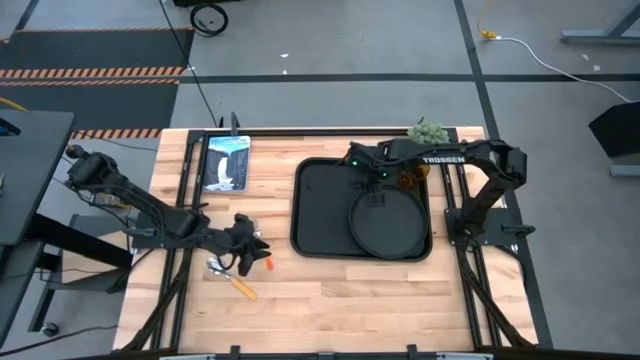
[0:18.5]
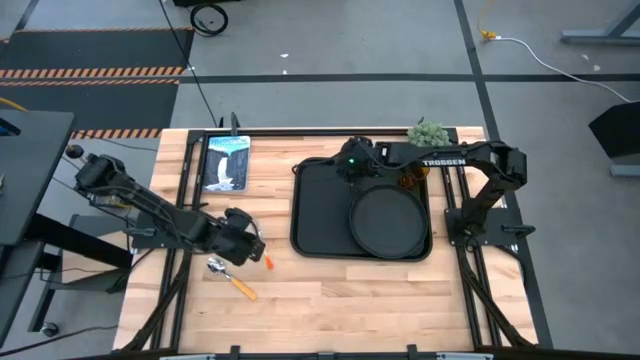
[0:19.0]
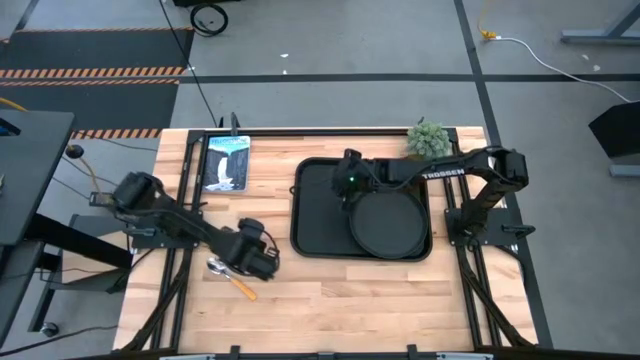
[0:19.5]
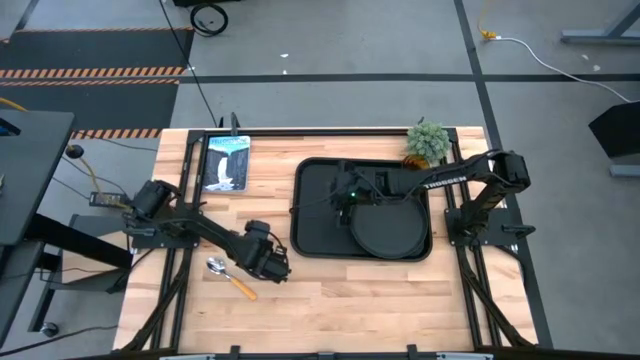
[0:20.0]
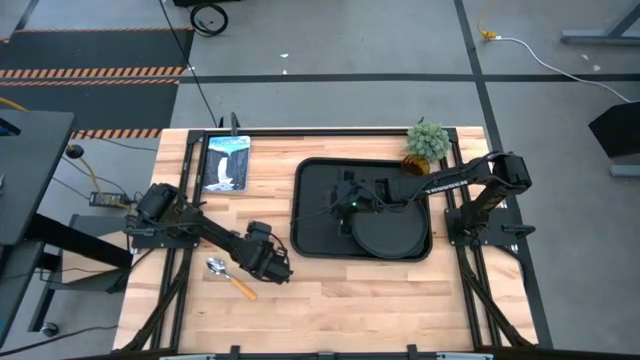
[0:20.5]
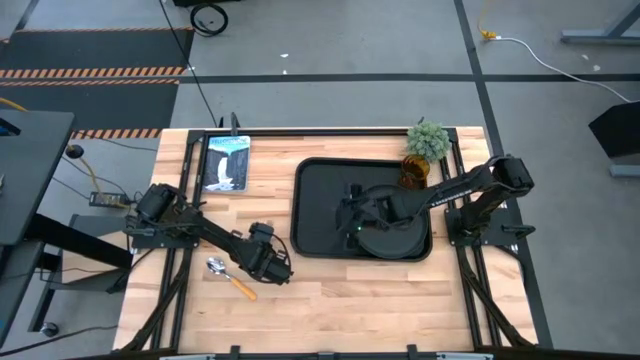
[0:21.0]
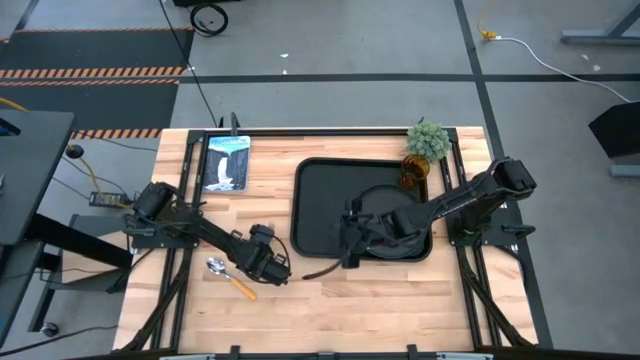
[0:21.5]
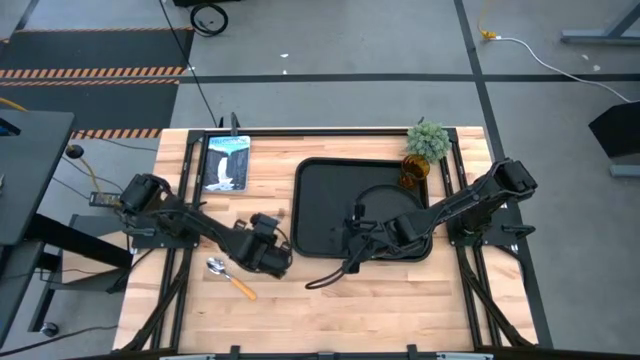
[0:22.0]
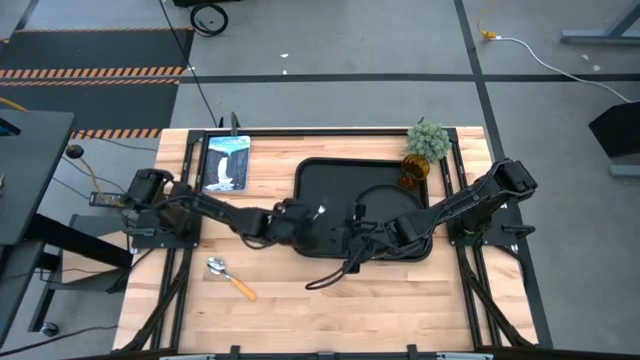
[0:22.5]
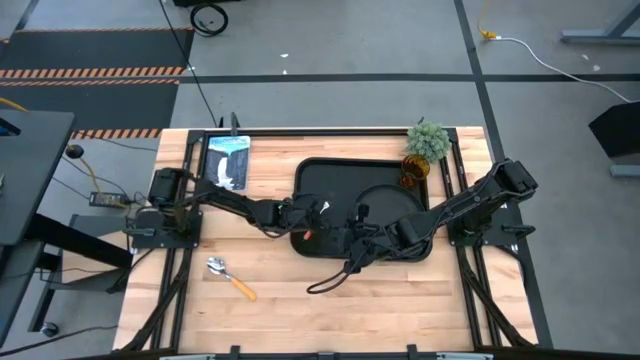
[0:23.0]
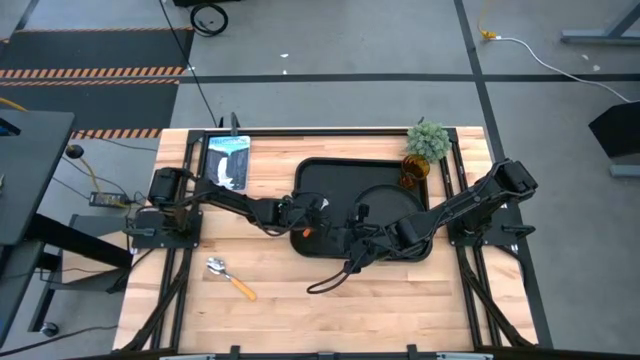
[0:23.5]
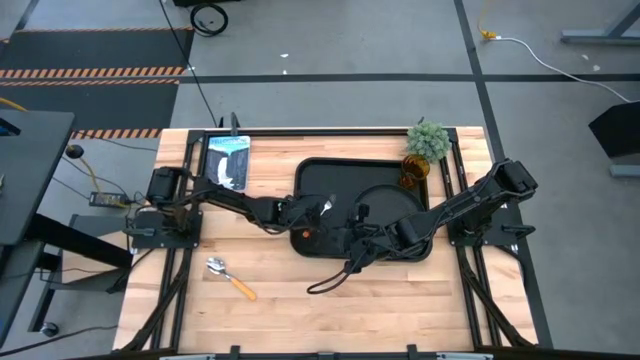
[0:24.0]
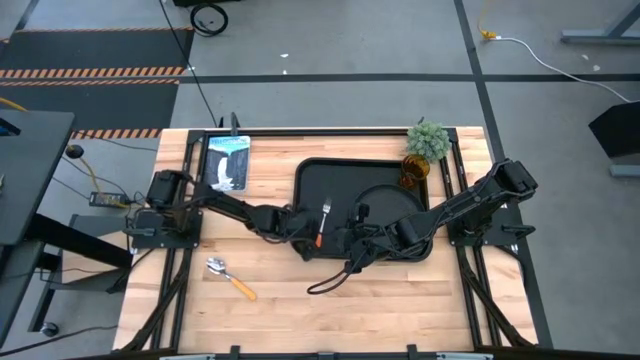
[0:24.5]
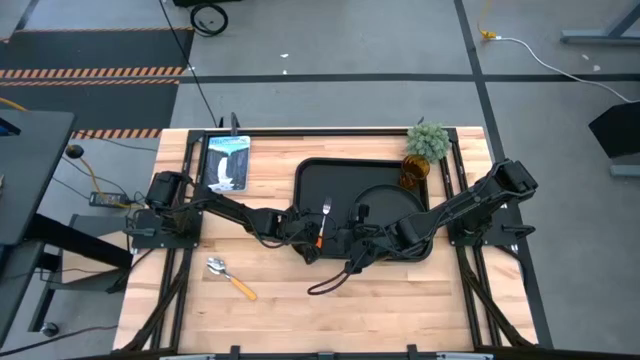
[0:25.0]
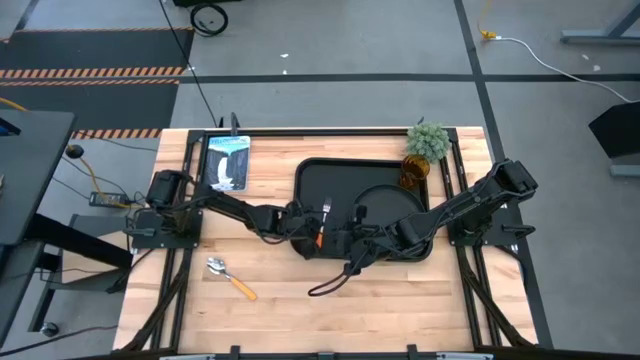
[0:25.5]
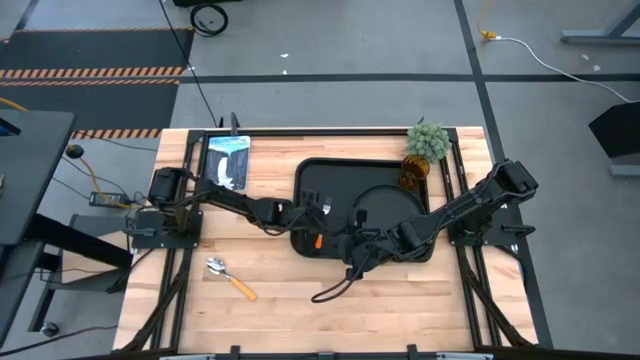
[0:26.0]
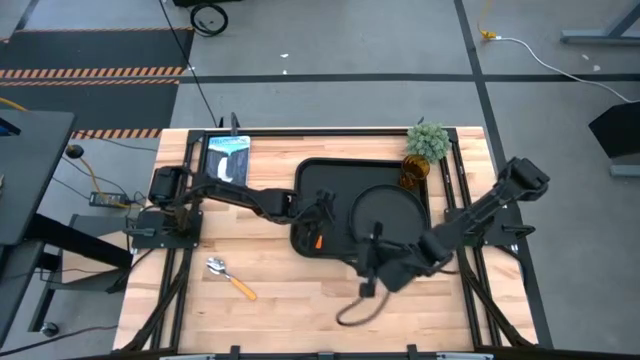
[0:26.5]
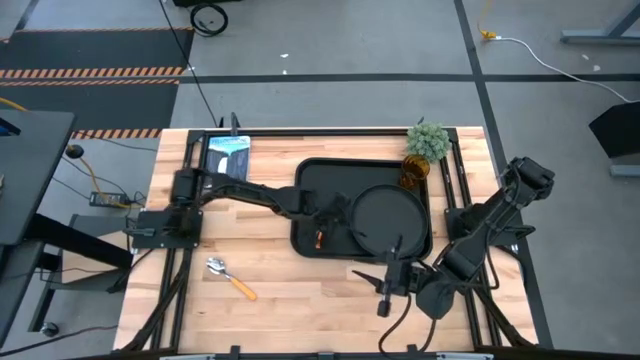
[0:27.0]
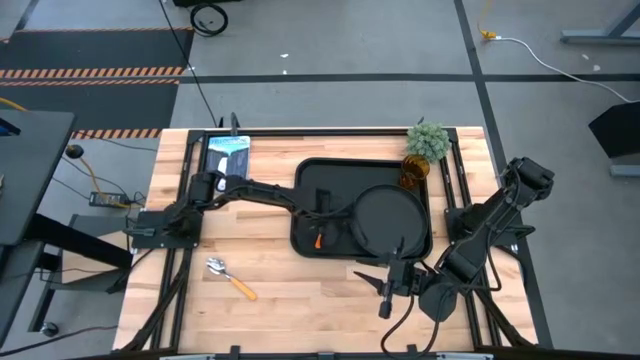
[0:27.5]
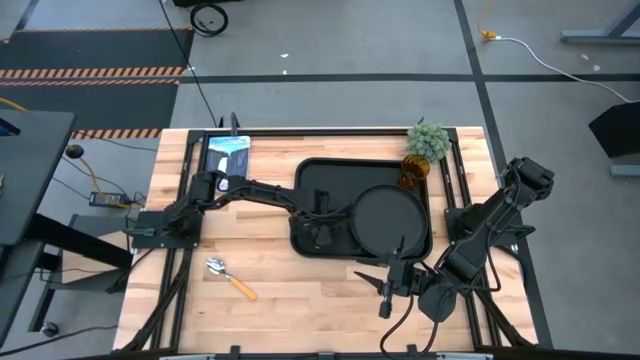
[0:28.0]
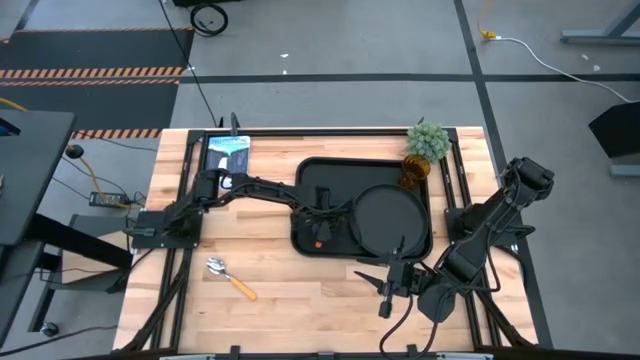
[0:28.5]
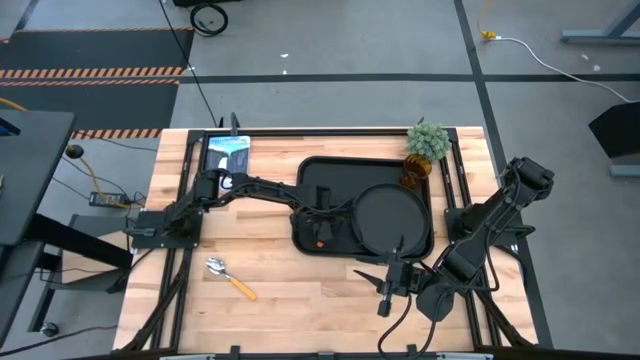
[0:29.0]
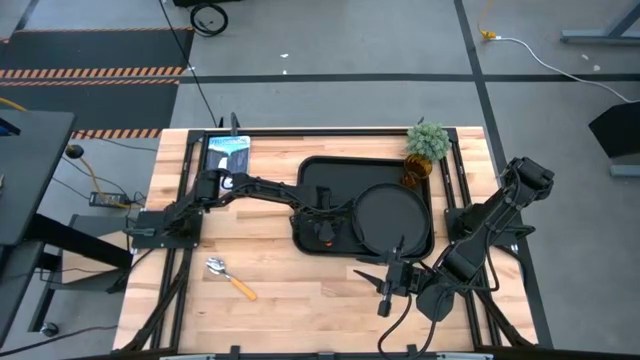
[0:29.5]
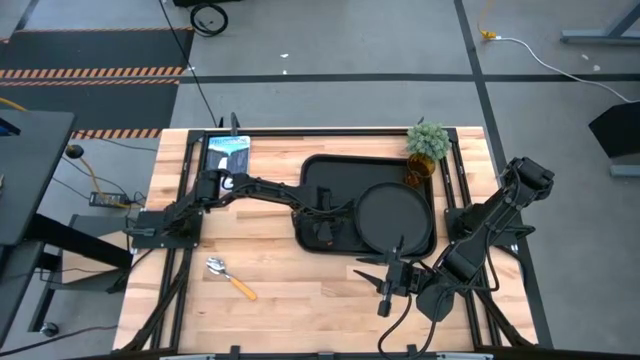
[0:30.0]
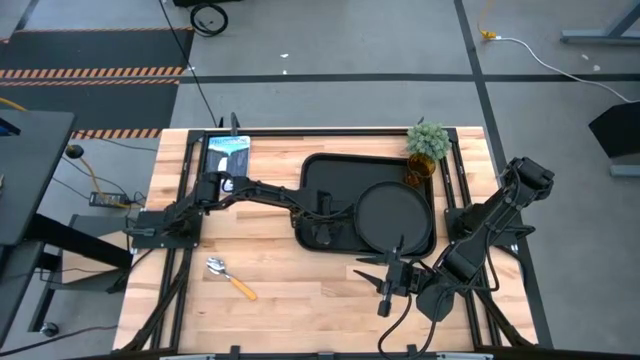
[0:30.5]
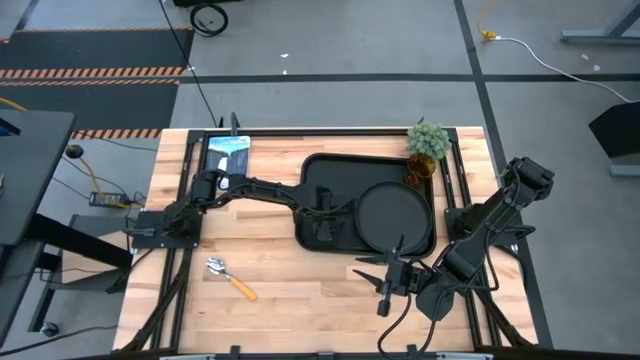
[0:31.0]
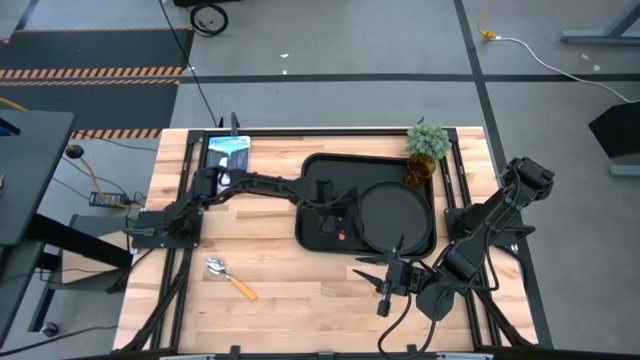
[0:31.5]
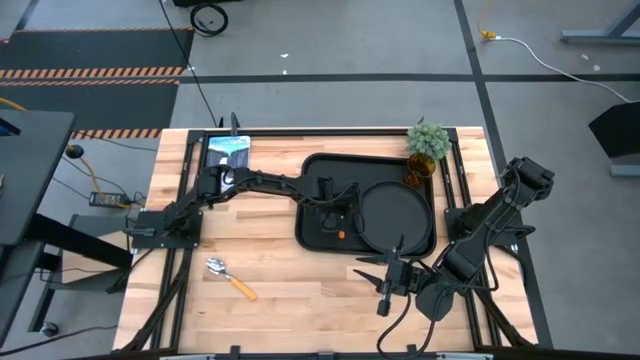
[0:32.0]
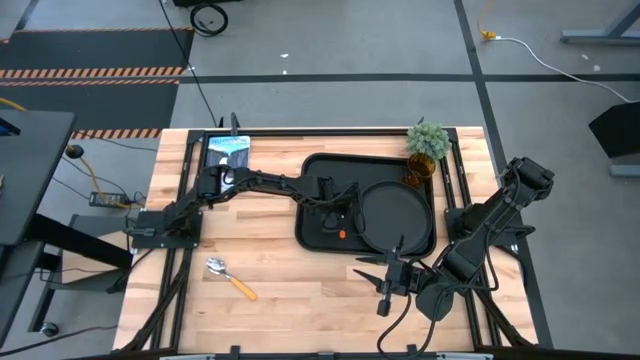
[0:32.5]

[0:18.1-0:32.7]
Task: Pick and place plate/cup/fork/spoon on tray
Put the orange fork on the black tray to the left of the black plate

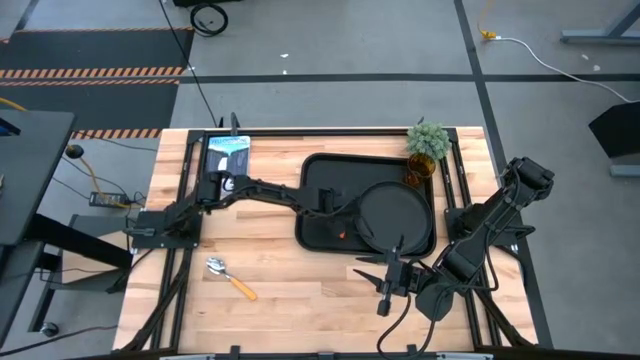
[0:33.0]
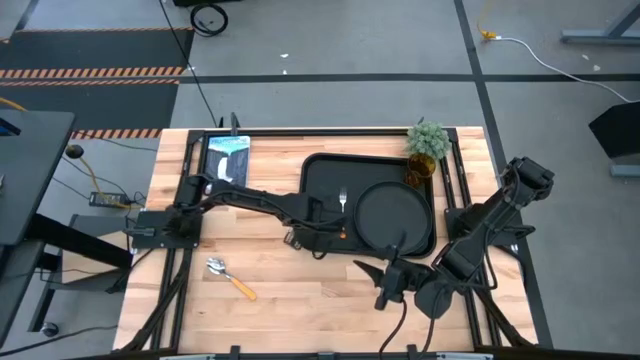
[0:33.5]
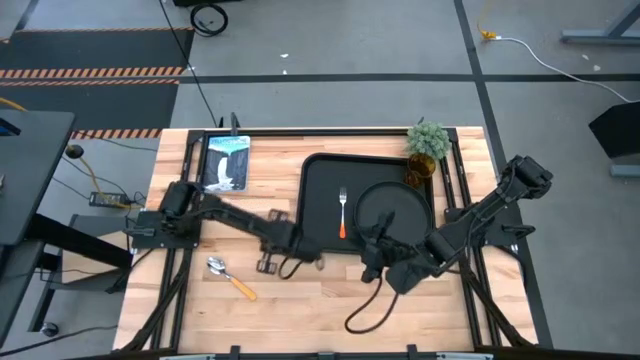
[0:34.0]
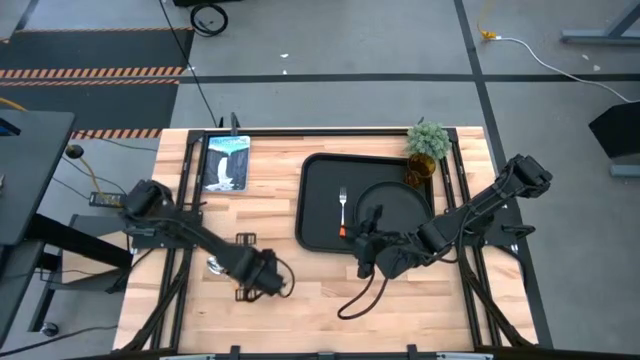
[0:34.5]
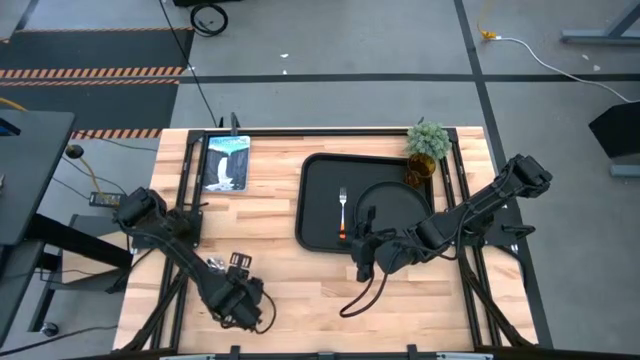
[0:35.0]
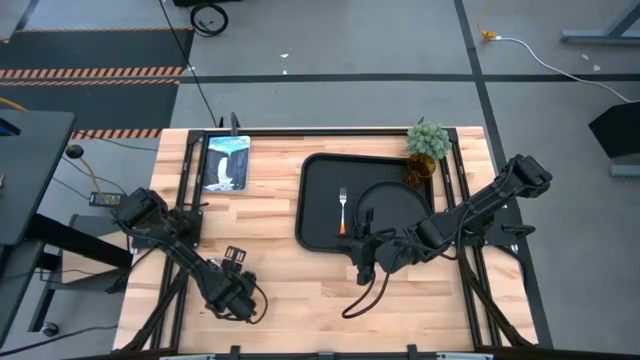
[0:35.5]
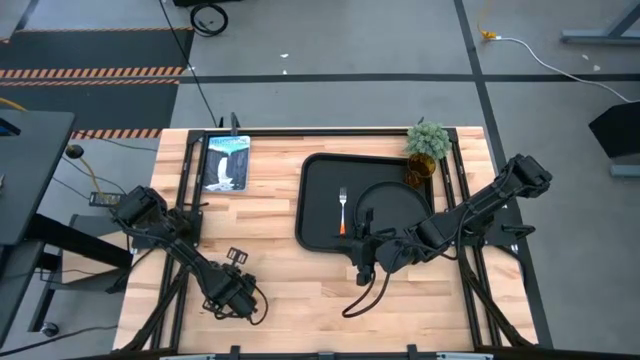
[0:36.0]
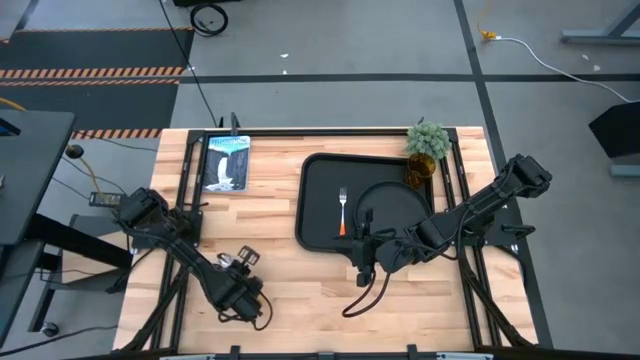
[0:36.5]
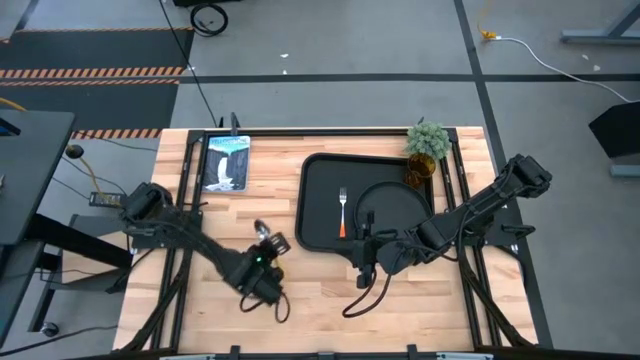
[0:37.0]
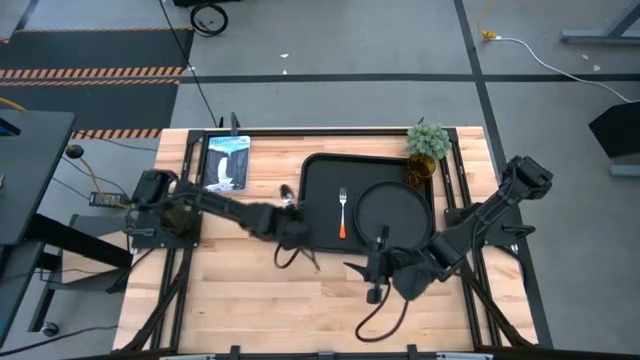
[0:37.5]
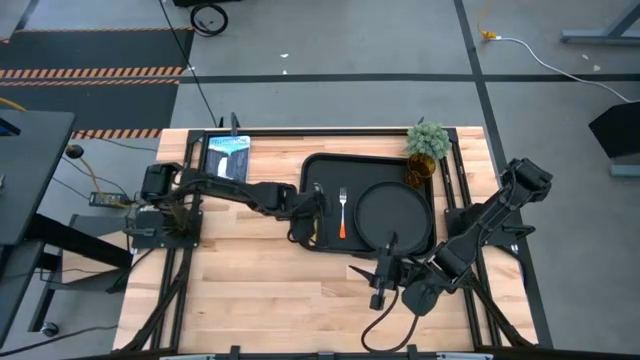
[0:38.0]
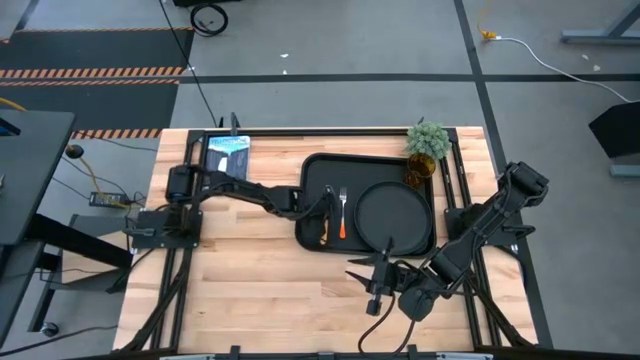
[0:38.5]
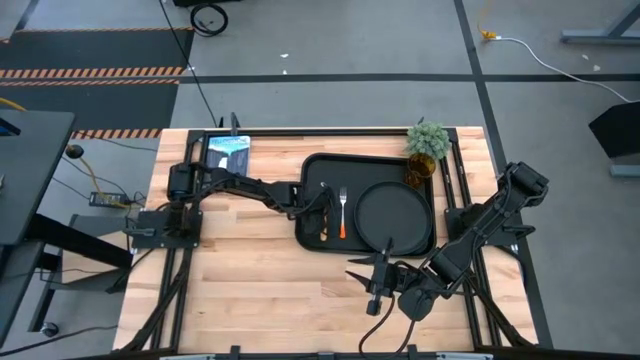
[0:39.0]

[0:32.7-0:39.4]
Put the yellow spoon on the black tray to the left of the black plate
